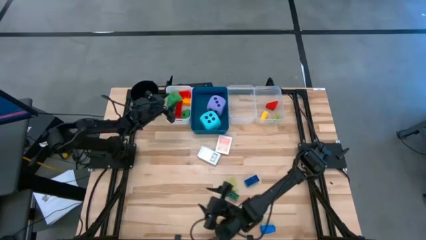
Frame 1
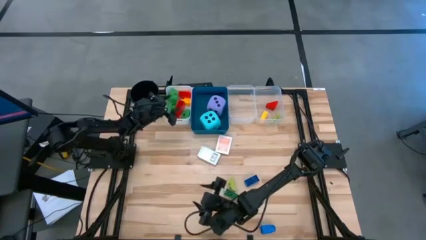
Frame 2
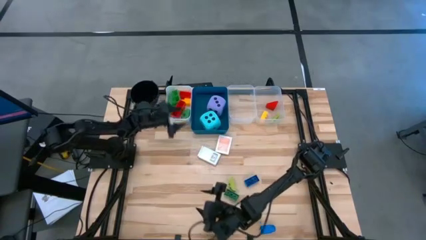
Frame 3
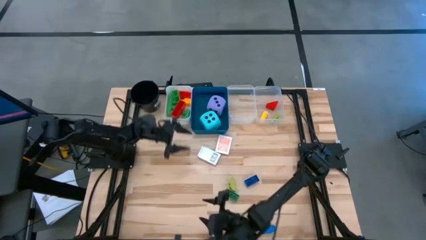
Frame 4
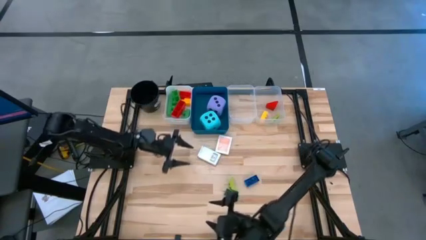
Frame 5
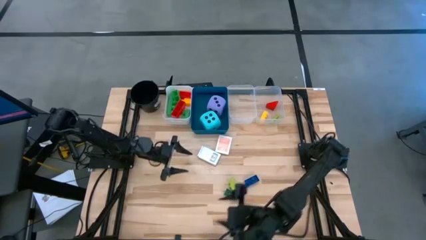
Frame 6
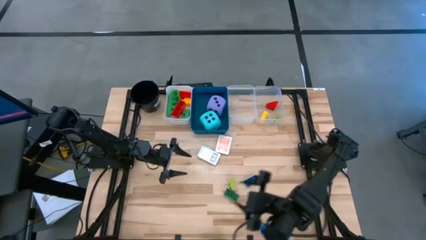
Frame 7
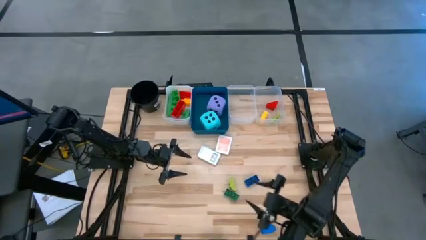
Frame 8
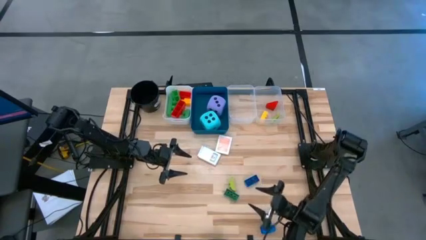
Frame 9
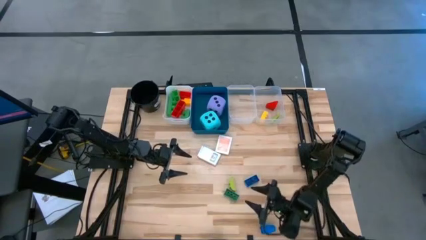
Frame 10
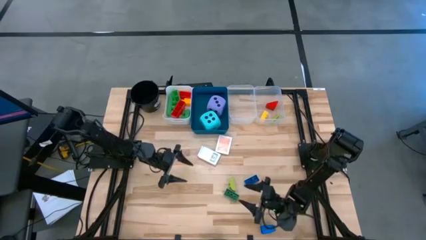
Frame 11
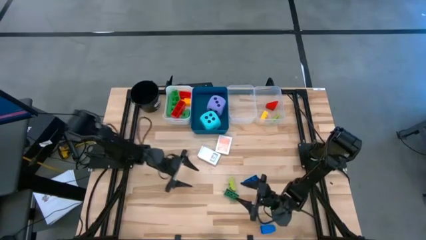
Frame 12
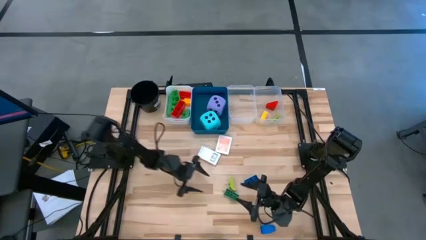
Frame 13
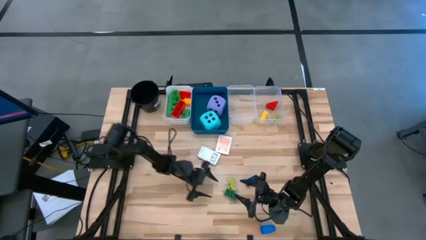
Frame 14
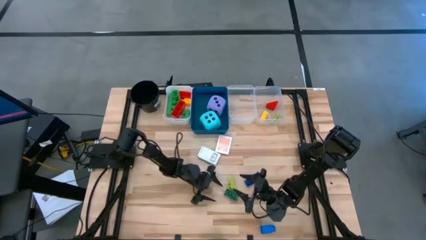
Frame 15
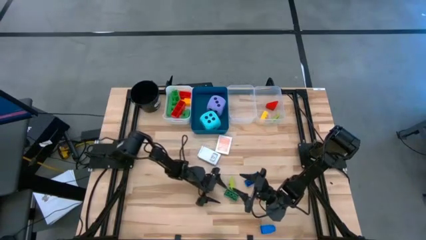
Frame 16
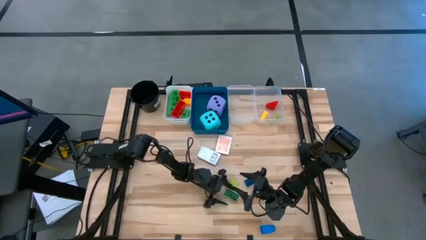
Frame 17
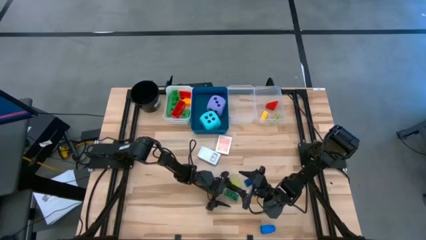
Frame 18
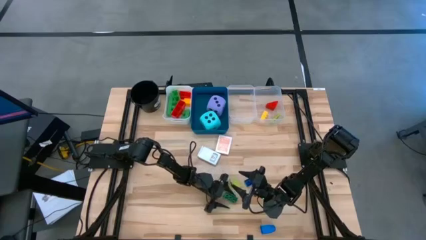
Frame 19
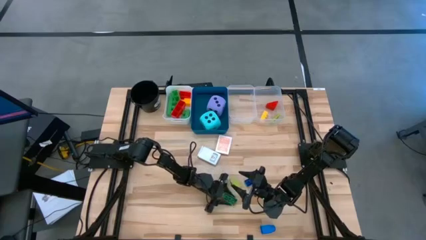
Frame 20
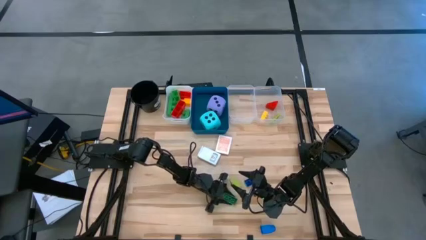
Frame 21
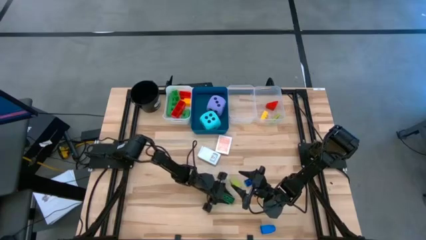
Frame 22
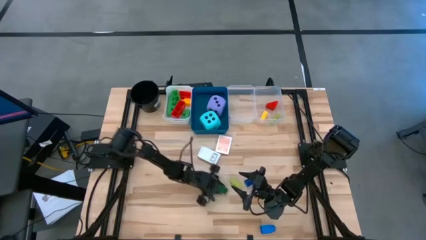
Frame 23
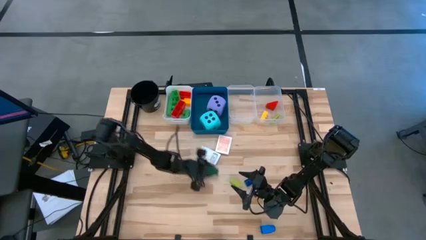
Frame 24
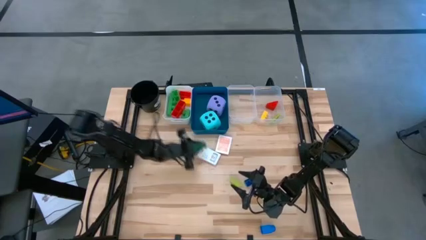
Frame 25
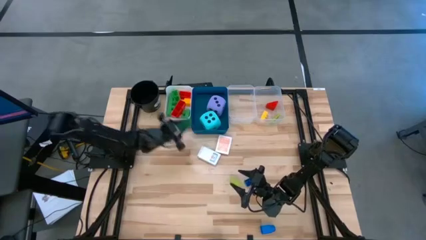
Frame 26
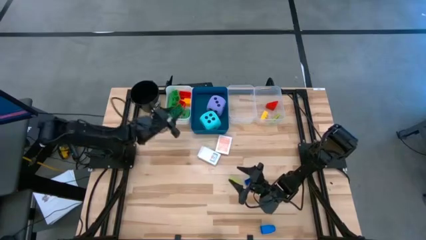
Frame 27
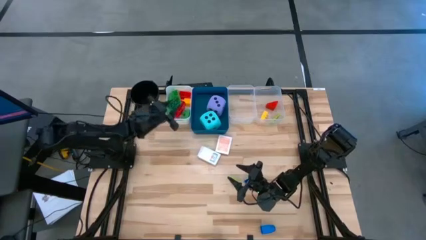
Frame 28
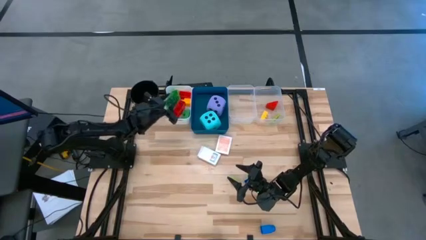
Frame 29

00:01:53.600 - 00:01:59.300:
Task: Pick & Place Toys
Put the small green game piece into the right transparent bin

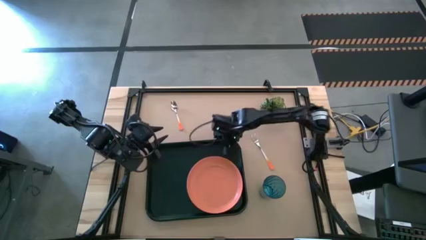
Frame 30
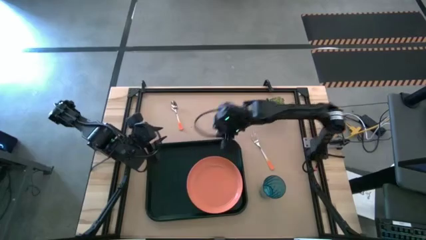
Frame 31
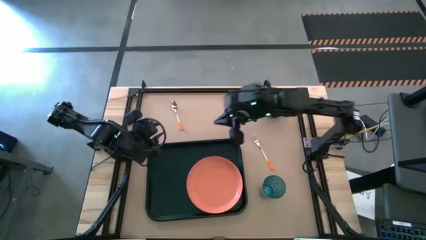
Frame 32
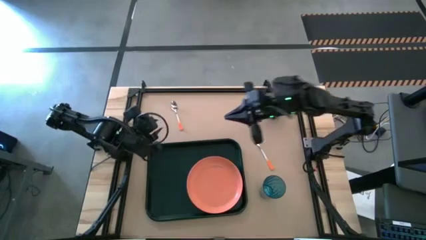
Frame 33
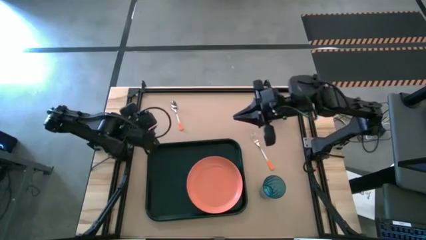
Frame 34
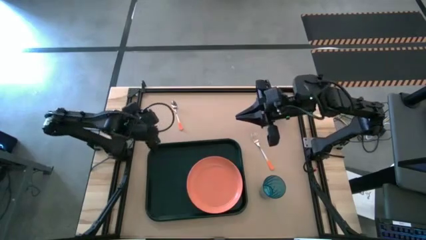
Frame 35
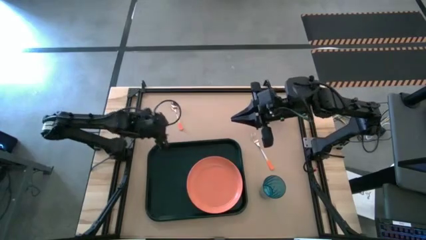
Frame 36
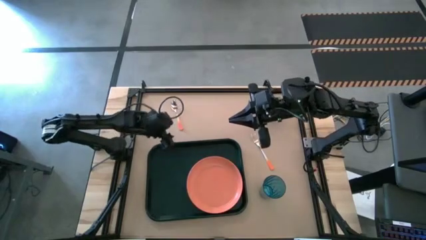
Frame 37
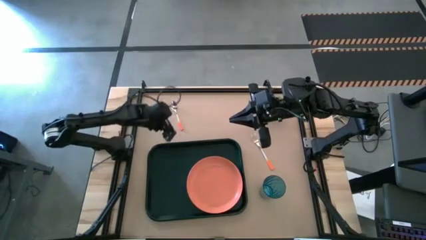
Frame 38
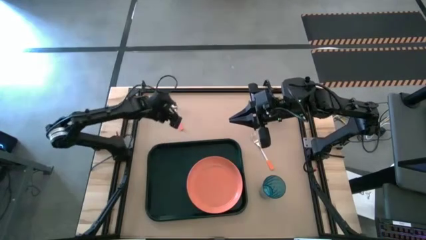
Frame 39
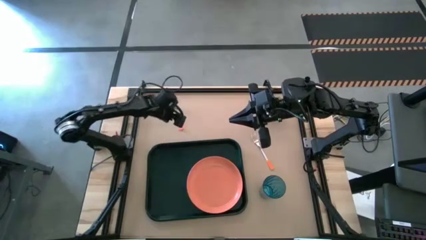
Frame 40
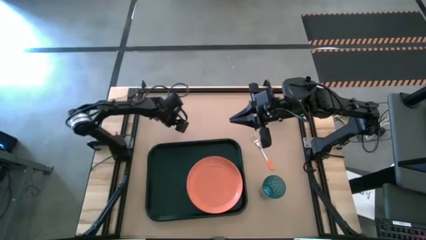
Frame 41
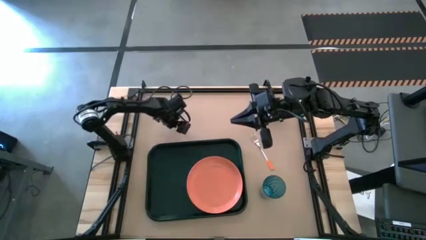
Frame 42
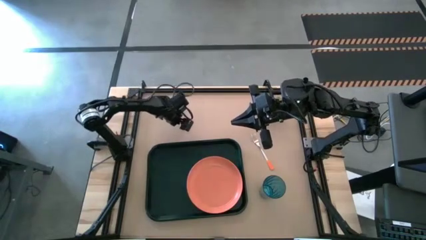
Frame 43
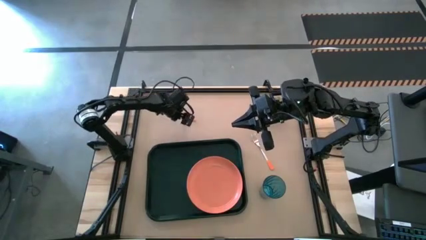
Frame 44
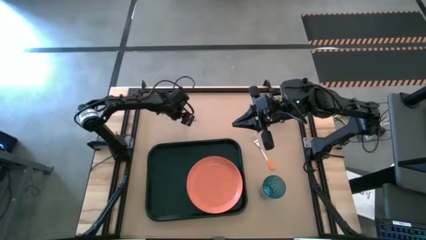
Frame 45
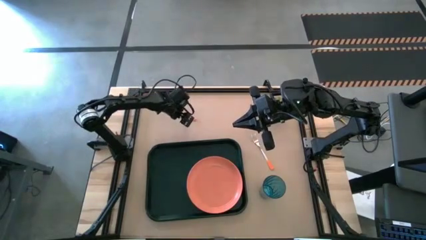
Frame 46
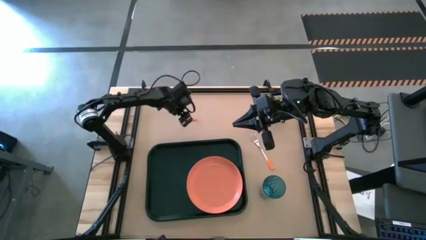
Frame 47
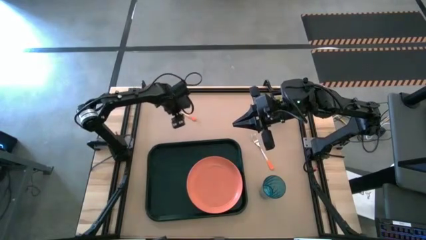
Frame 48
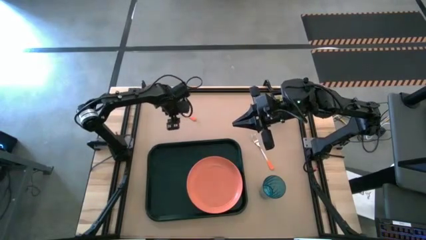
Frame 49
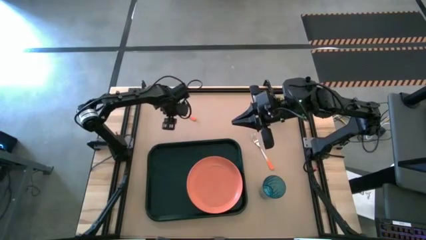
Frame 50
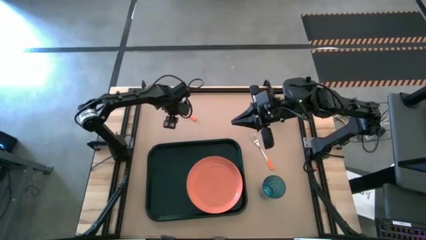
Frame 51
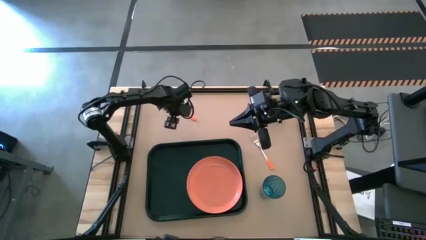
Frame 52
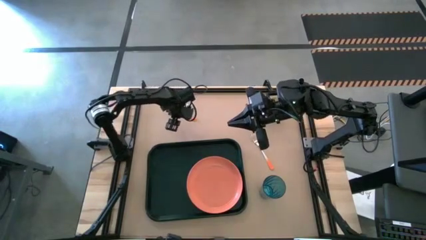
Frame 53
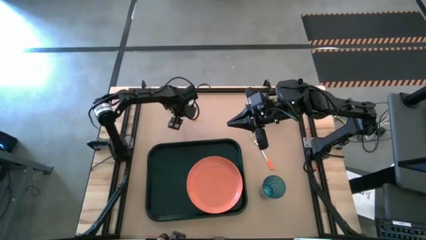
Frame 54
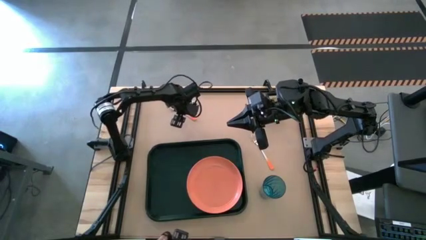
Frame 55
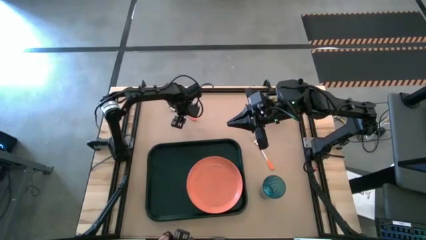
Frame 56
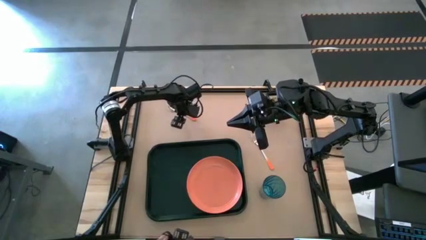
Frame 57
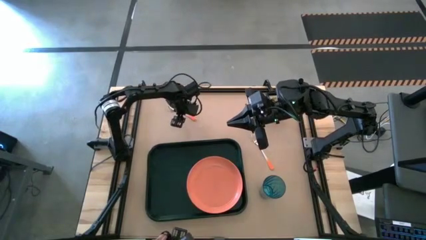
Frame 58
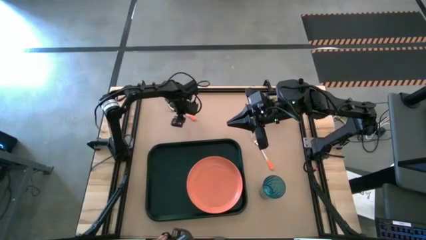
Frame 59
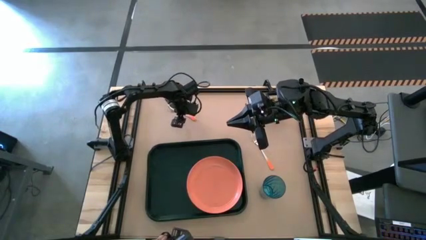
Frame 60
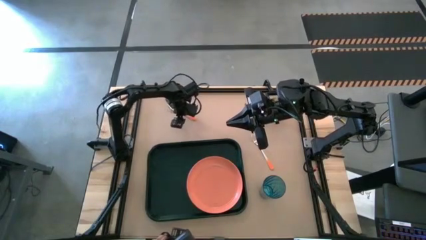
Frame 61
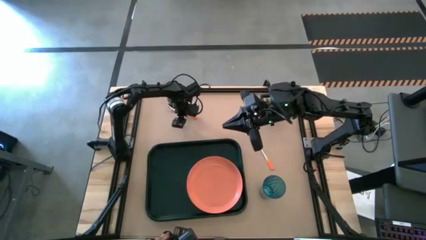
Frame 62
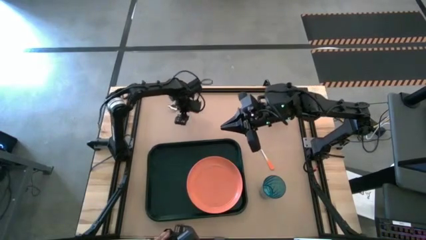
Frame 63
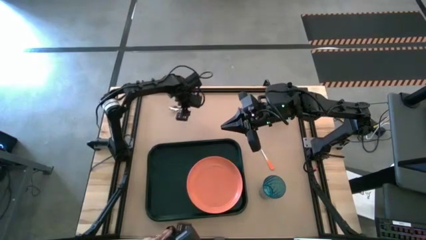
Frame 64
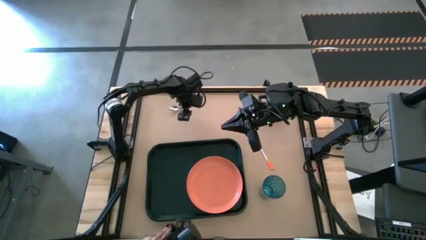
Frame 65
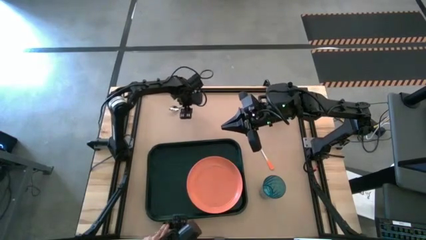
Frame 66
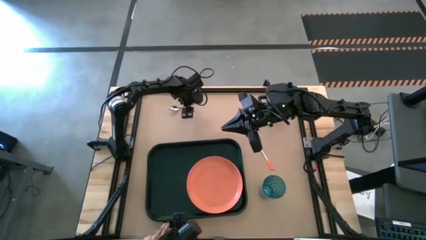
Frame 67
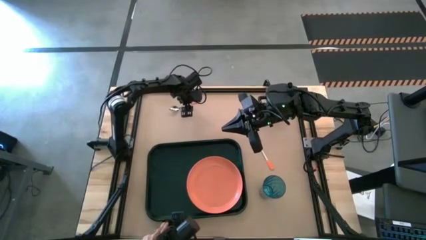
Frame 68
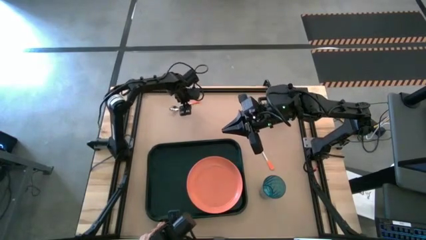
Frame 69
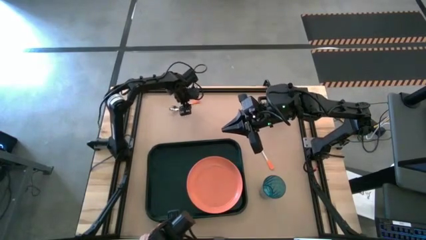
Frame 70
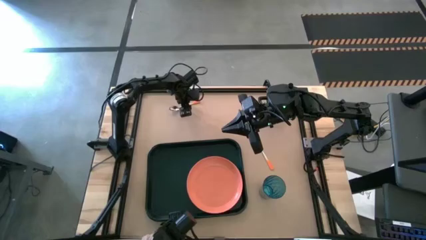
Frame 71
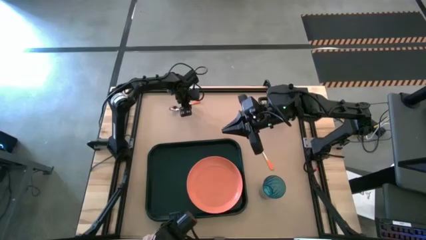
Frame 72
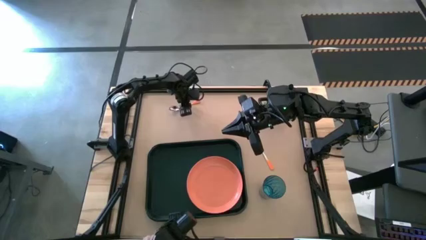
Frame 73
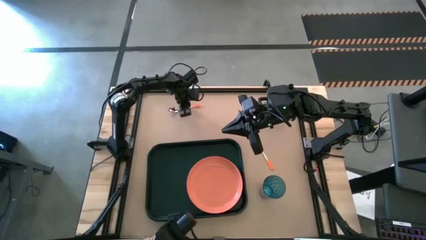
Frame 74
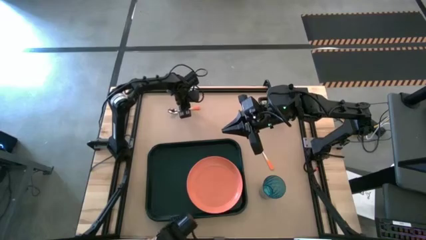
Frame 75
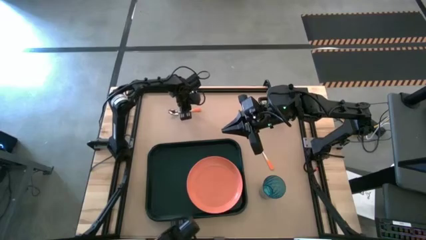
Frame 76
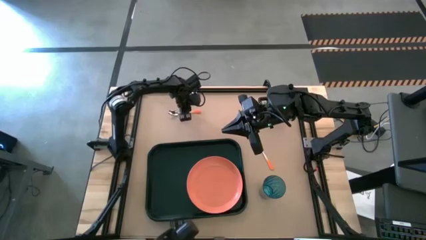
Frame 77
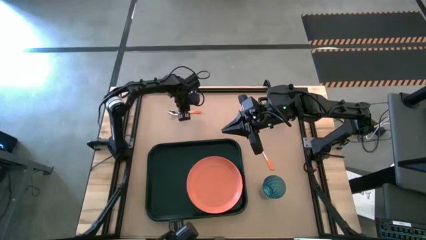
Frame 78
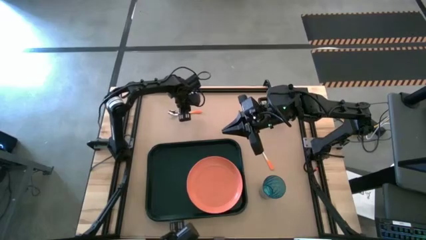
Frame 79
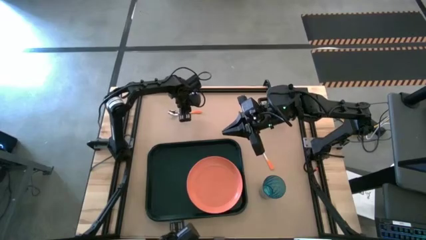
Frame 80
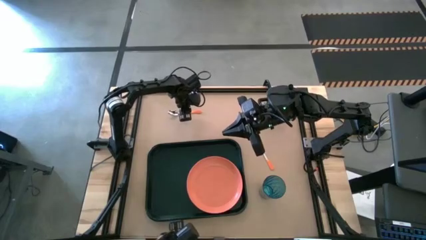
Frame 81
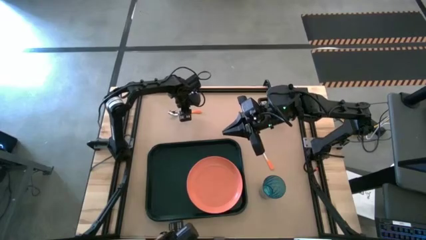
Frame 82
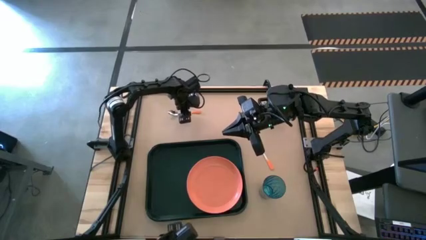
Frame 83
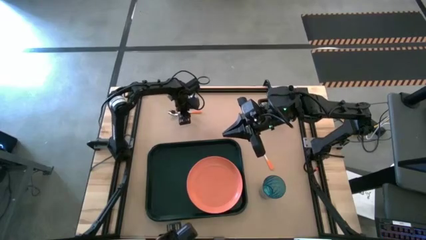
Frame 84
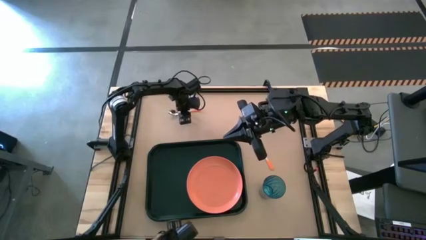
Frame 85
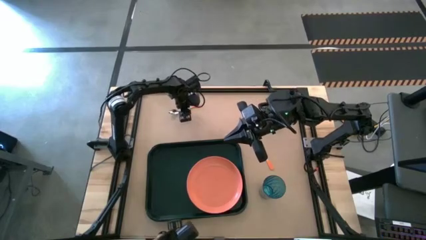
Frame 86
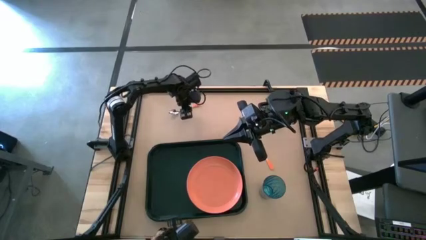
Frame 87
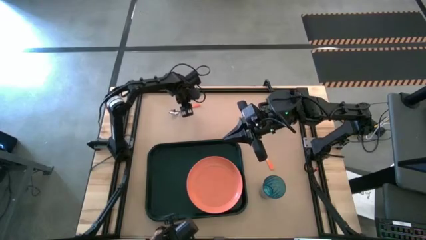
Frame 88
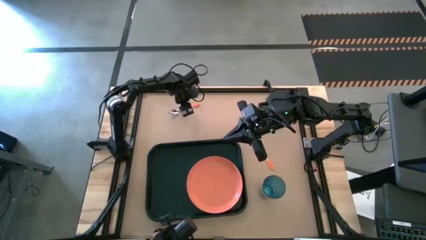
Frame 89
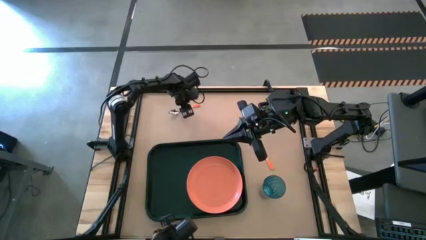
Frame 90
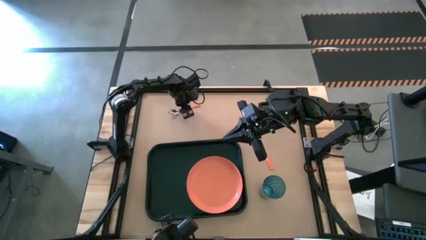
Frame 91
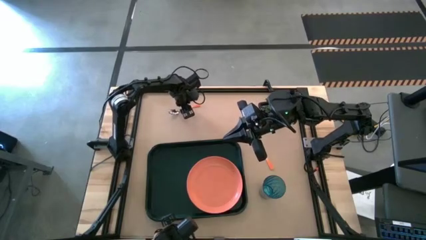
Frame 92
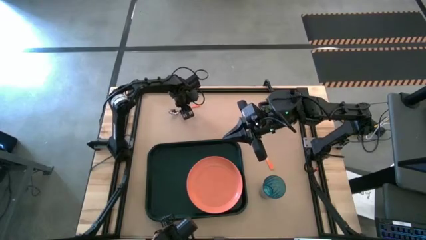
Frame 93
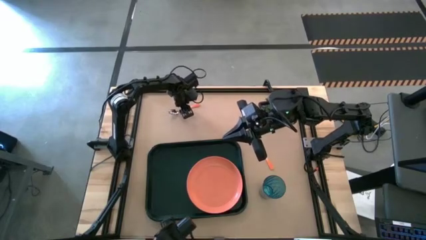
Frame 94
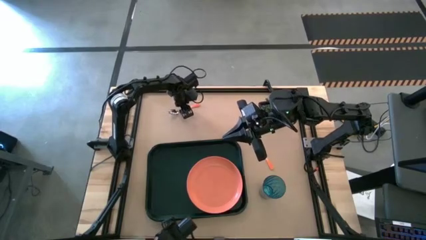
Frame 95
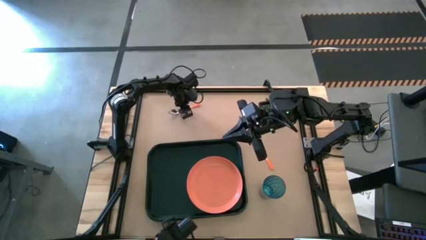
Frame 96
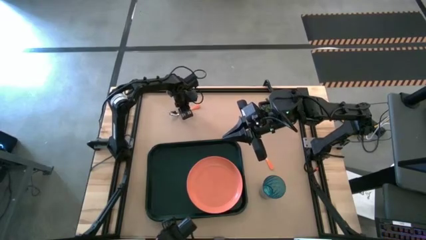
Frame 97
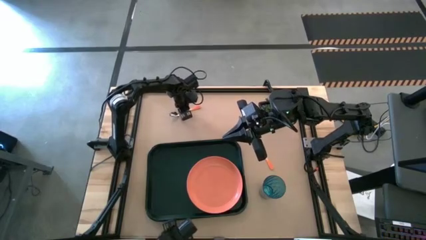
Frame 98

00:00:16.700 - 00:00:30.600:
Task: Pick and place plate/cup/fork/spoon on tray
Put the orange spoon on the dark green tray
